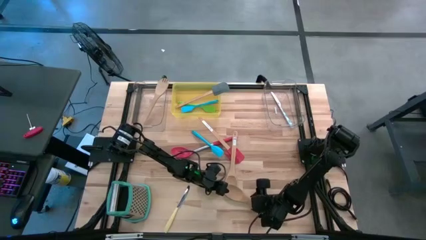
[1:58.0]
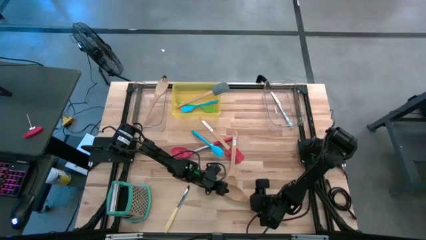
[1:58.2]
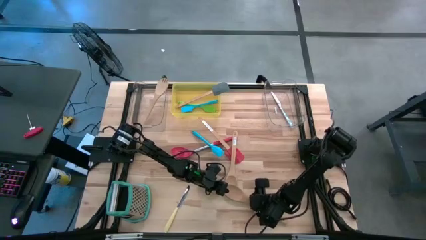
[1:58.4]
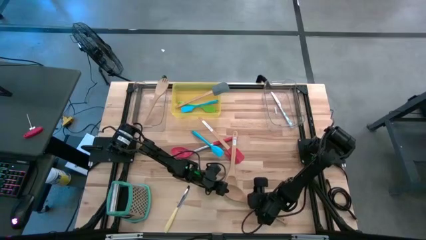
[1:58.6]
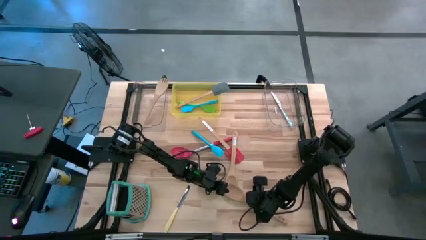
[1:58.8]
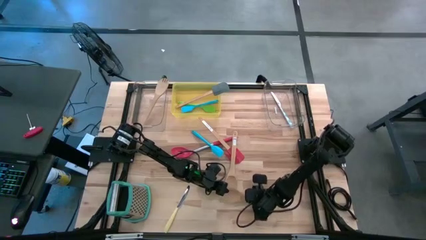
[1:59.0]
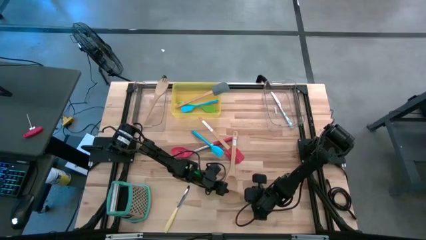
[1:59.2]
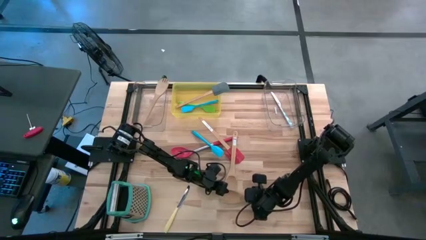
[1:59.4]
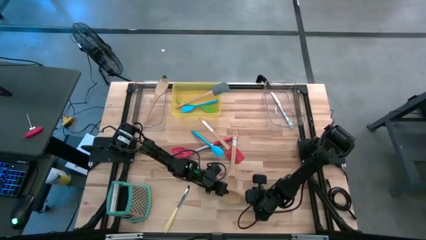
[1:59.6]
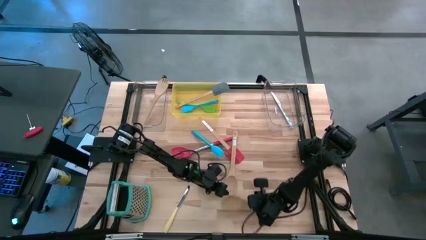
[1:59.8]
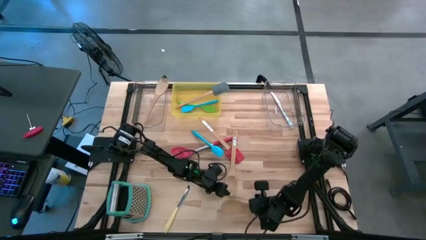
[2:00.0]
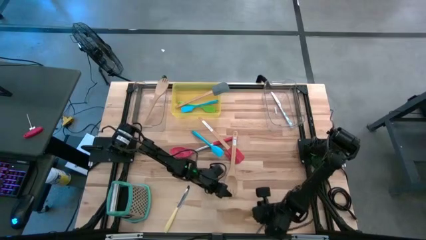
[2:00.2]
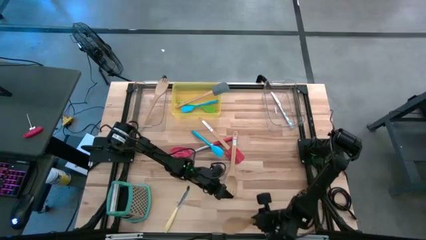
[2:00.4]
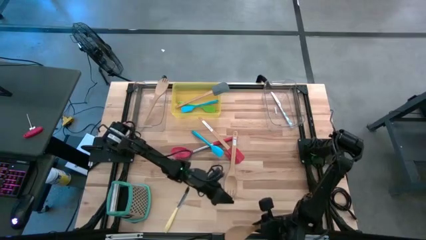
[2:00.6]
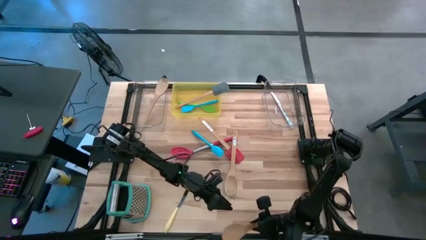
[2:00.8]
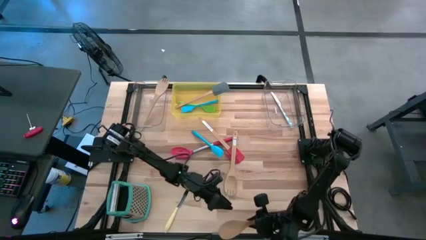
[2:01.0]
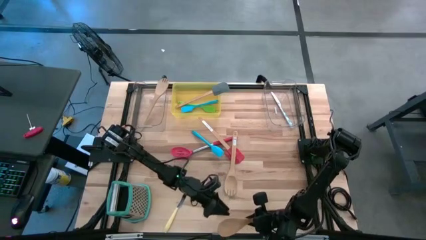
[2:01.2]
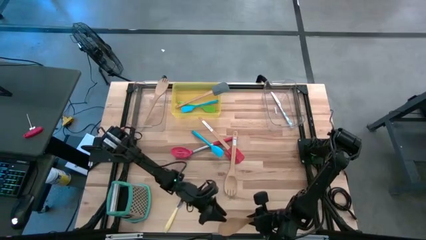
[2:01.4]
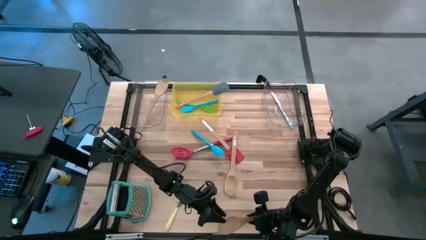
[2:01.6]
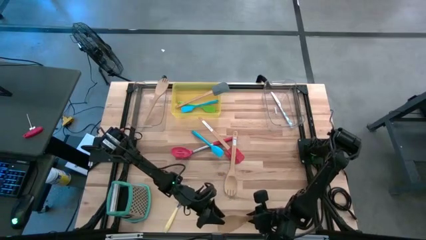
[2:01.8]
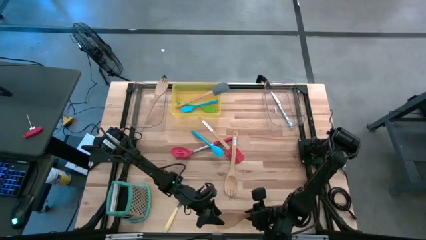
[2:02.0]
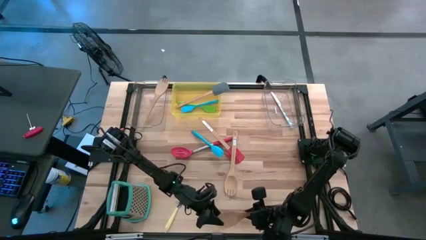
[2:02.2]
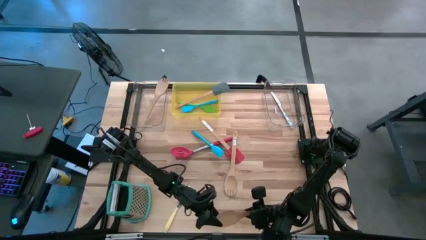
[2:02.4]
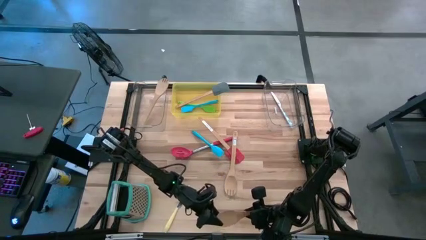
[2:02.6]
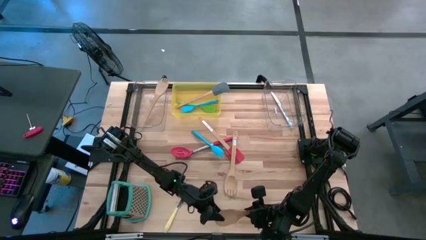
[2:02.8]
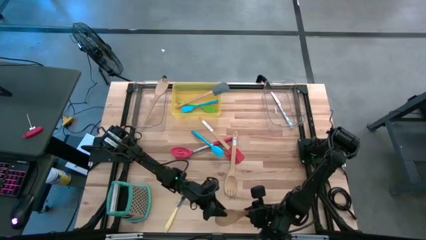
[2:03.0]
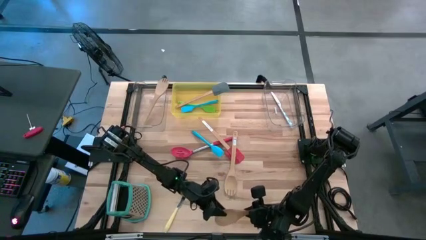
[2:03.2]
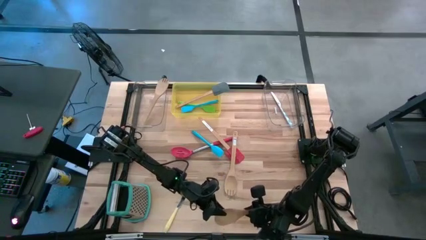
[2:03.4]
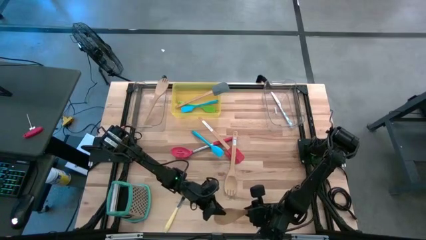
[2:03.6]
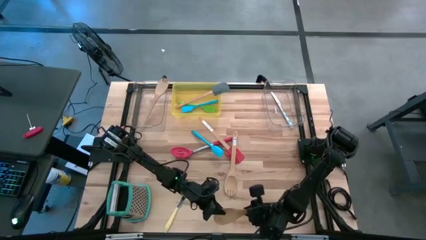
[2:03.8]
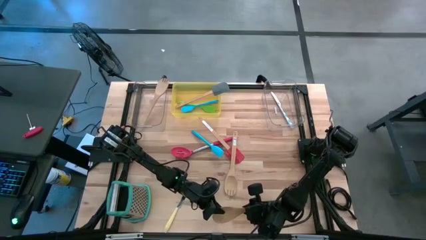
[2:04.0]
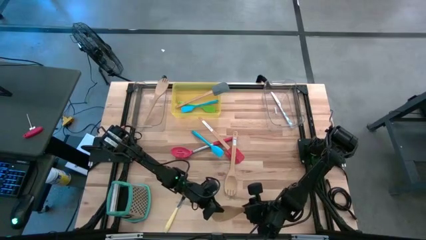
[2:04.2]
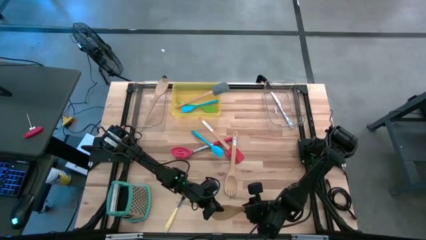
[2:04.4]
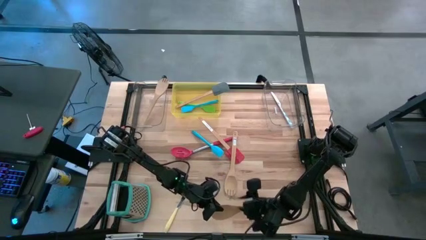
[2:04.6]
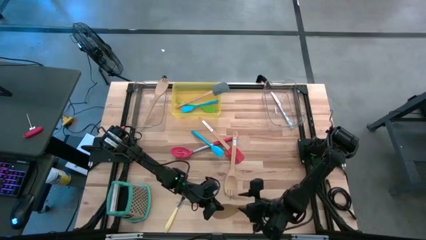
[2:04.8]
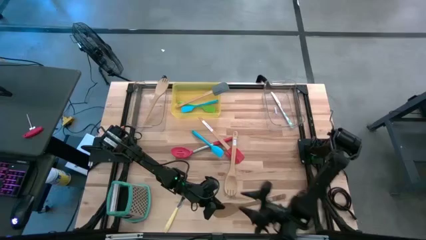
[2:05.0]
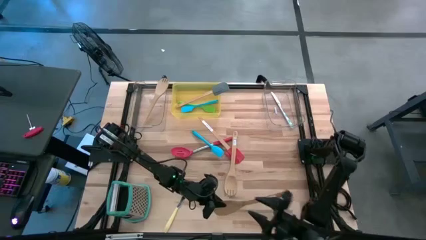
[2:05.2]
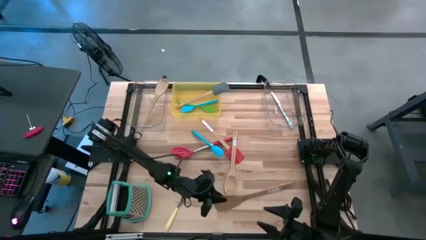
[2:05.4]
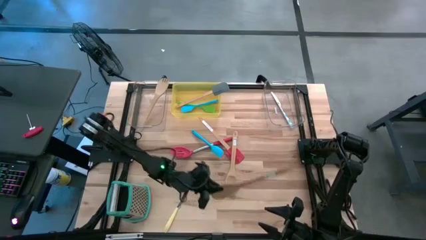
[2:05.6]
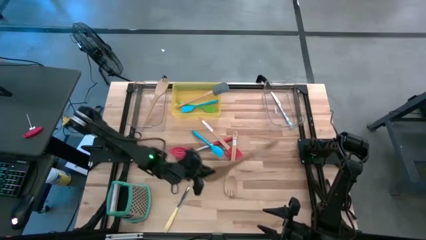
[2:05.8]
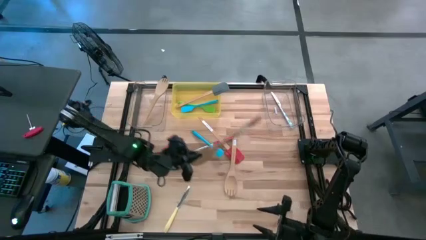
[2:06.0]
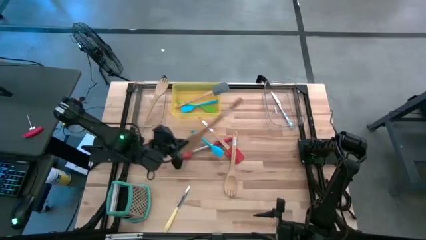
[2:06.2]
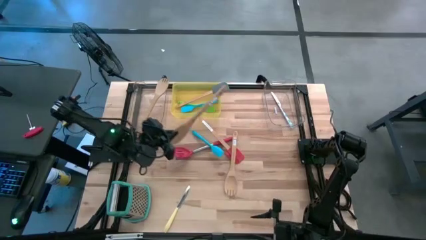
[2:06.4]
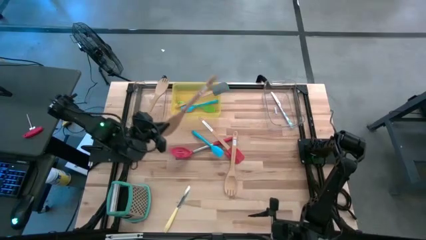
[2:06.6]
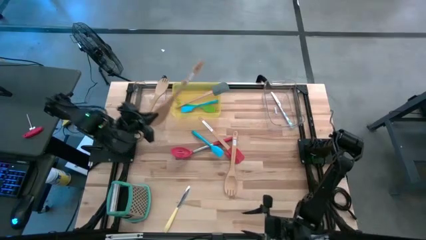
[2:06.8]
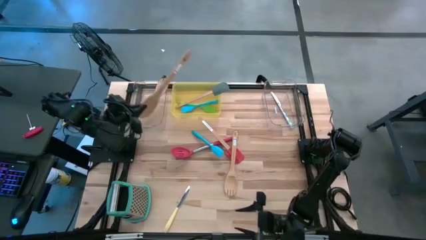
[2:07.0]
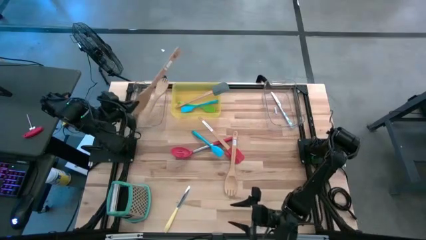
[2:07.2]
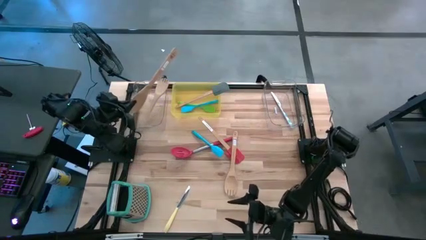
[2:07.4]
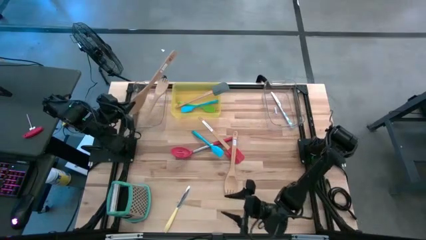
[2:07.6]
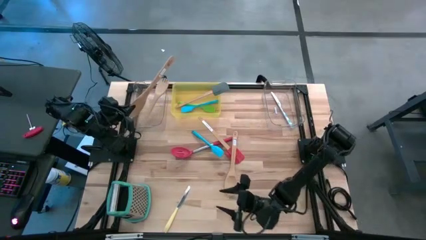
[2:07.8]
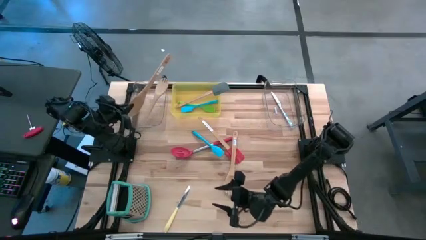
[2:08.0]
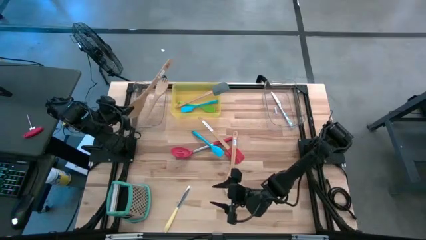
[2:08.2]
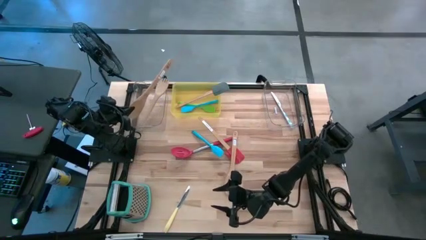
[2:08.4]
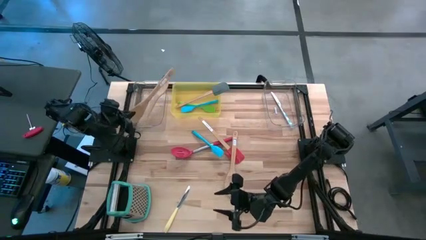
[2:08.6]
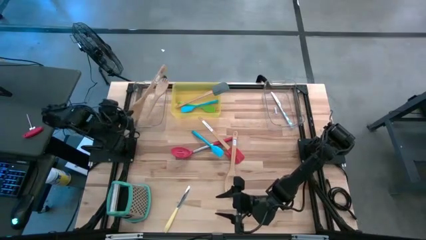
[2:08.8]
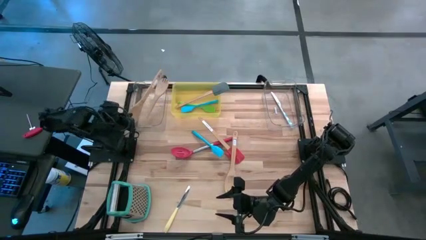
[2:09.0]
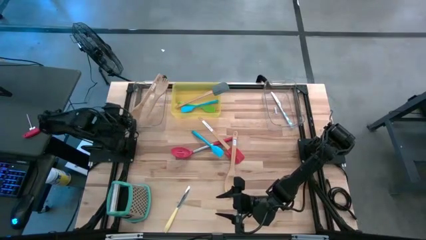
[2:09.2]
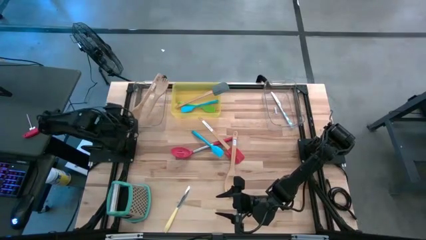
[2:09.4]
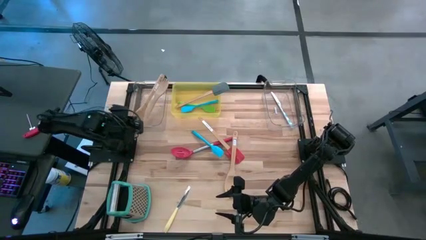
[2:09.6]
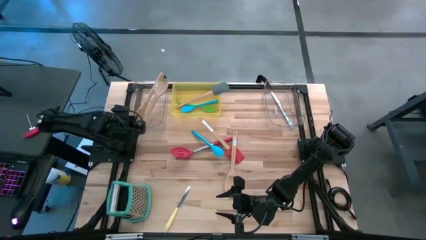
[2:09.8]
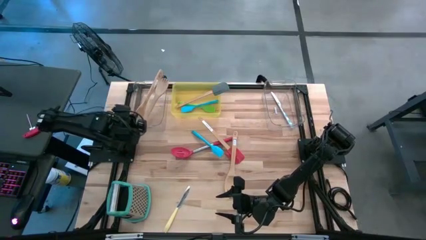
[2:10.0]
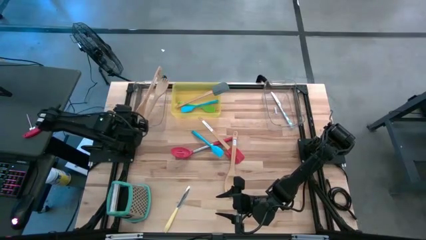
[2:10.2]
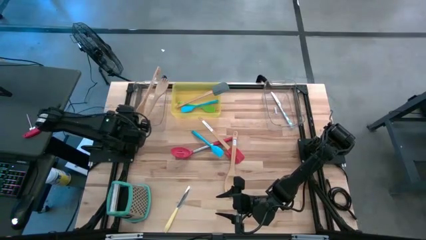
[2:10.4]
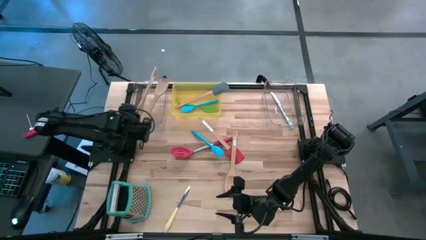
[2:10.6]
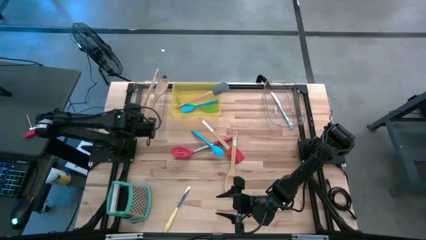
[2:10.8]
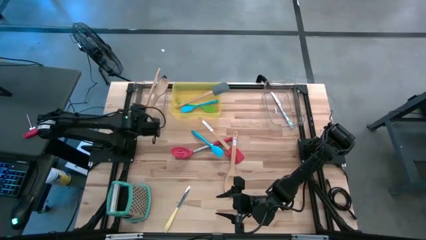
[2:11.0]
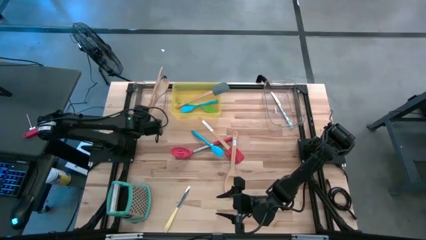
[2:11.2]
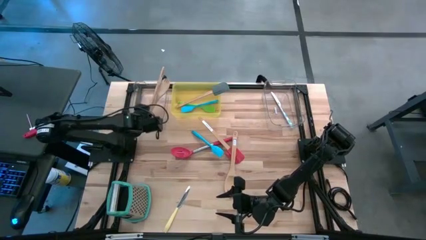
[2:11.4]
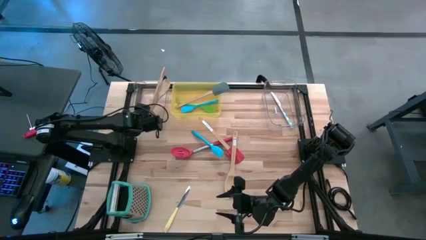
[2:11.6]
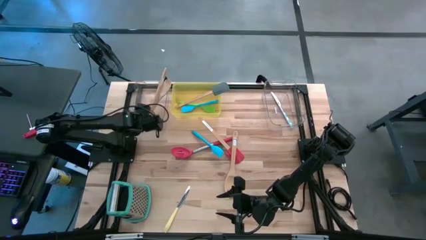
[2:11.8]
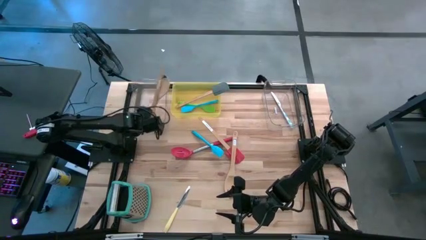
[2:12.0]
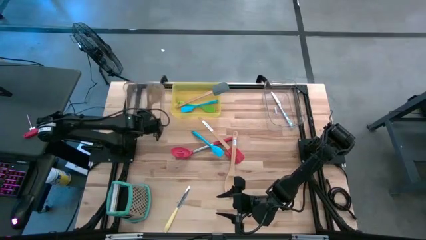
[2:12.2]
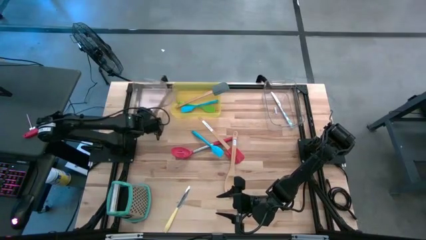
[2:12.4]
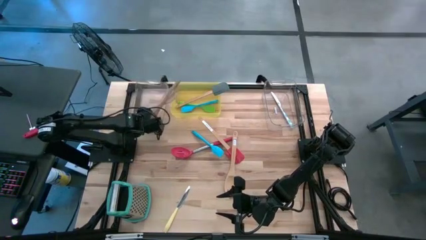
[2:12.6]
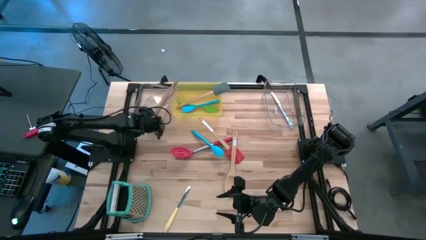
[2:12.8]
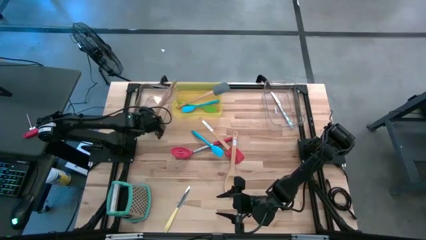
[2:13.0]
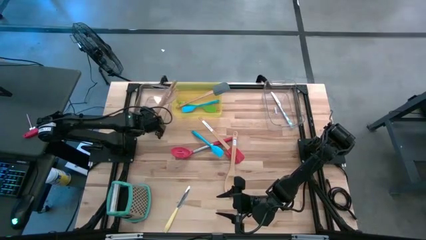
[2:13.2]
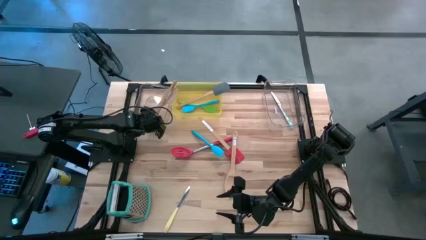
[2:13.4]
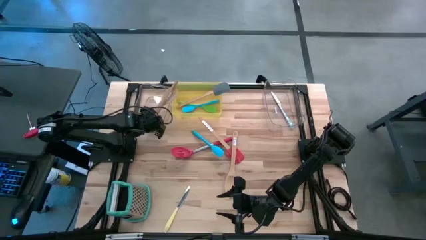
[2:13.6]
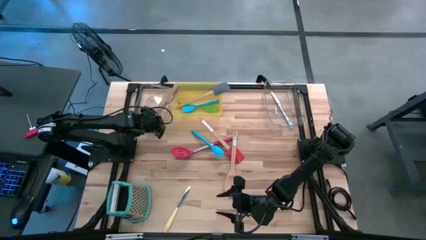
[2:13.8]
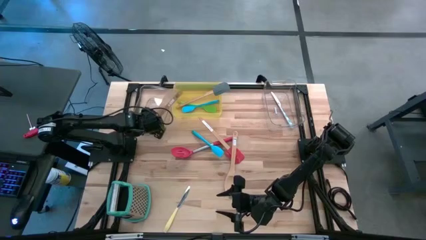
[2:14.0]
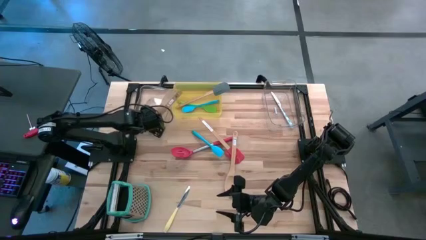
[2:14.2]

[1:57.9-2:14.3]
Task: Pick & Place Kitchen Items
Put the wooden serving spoon into the left transparent bin
